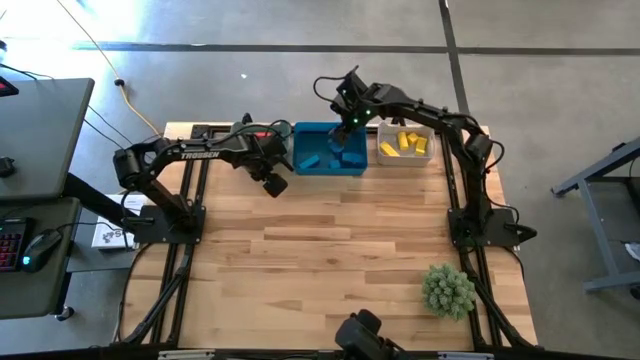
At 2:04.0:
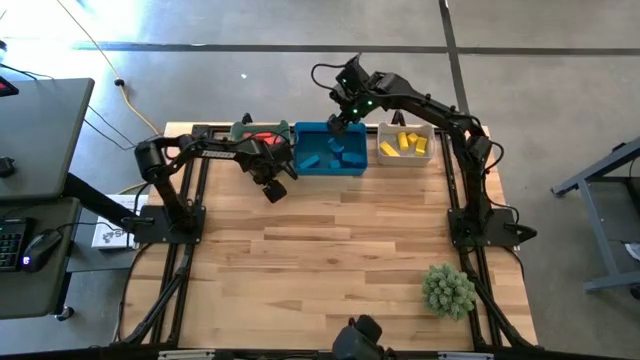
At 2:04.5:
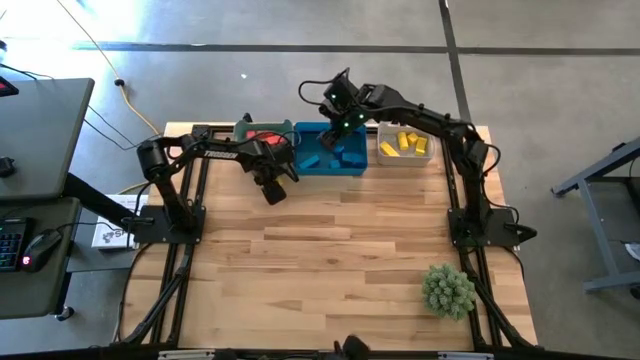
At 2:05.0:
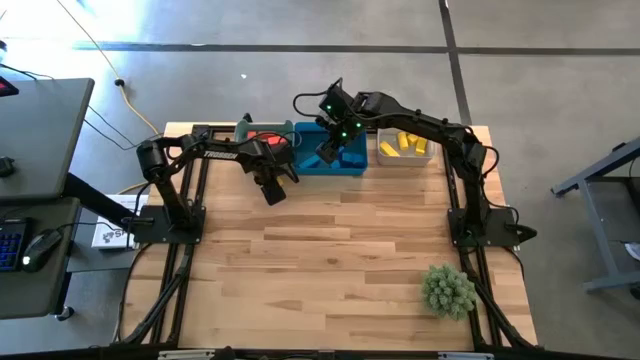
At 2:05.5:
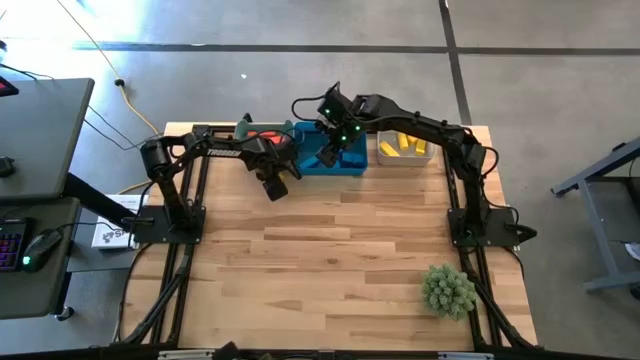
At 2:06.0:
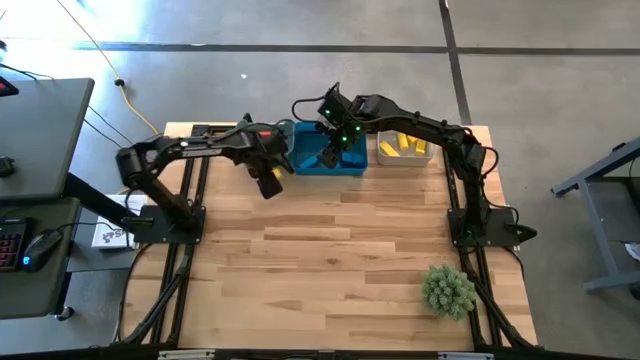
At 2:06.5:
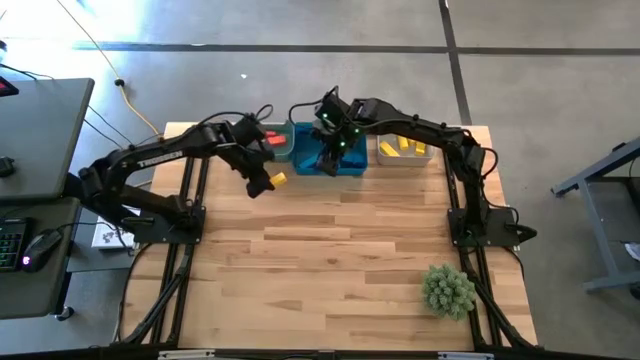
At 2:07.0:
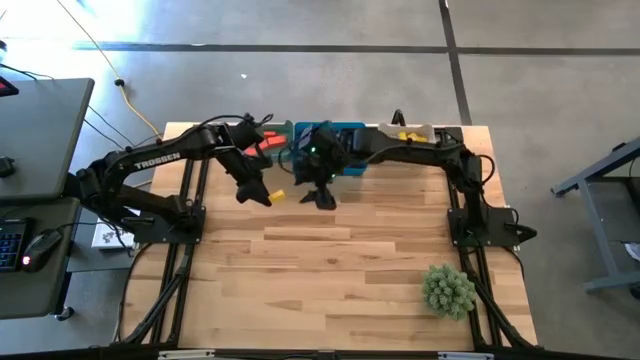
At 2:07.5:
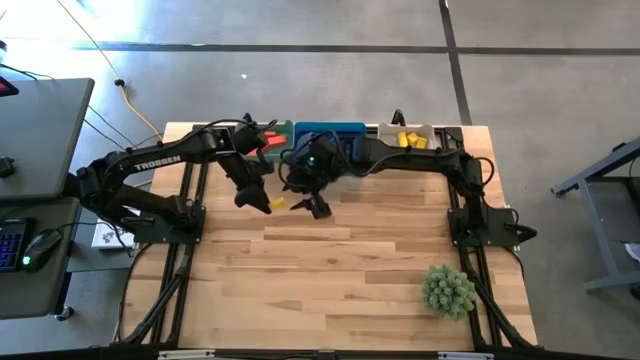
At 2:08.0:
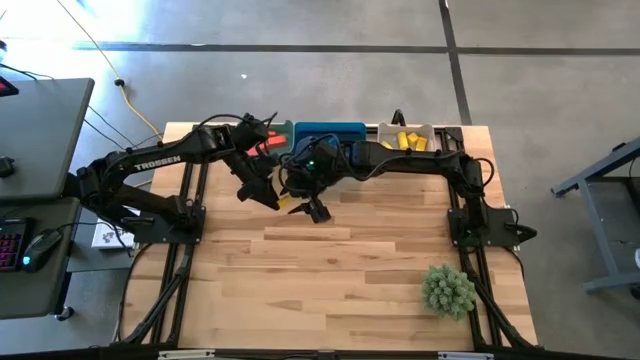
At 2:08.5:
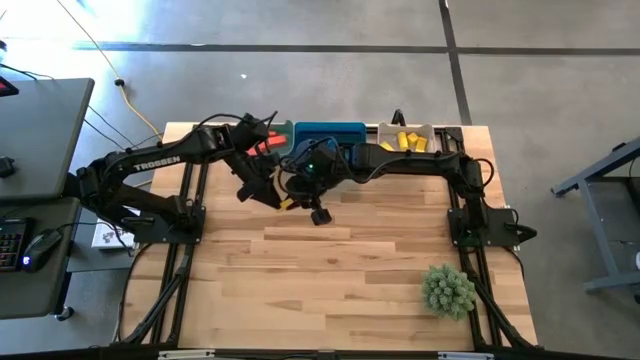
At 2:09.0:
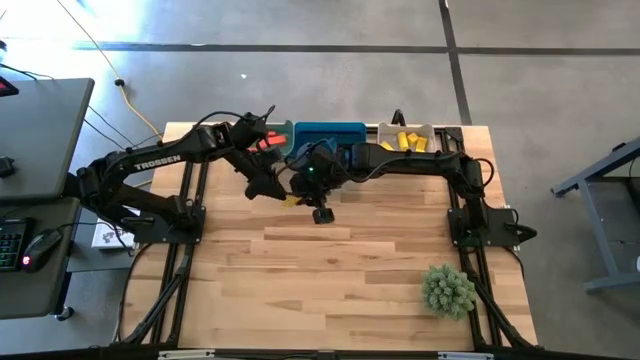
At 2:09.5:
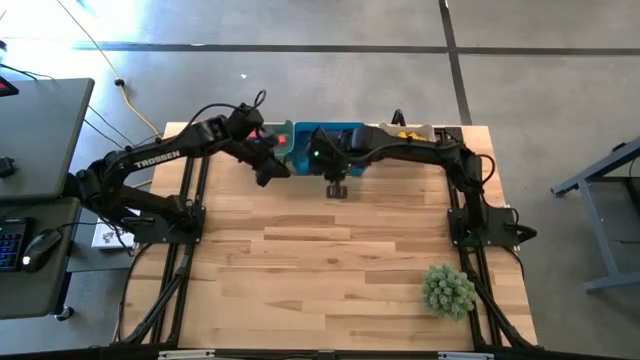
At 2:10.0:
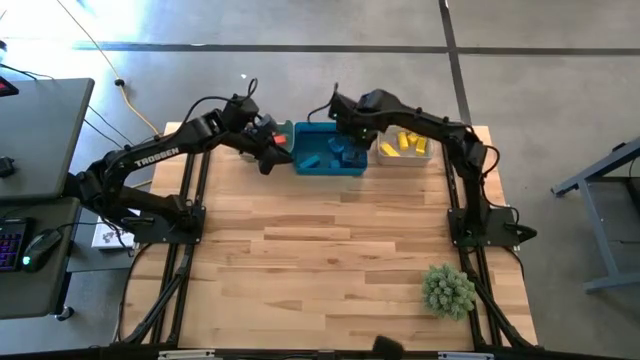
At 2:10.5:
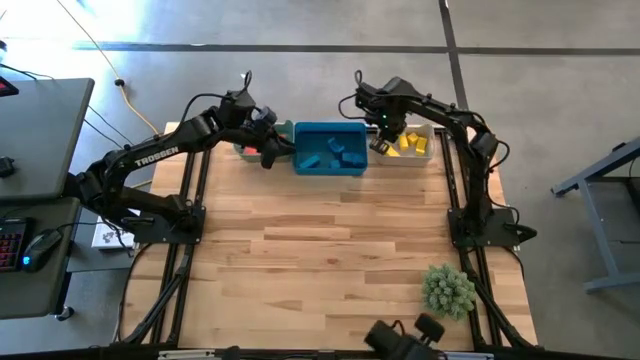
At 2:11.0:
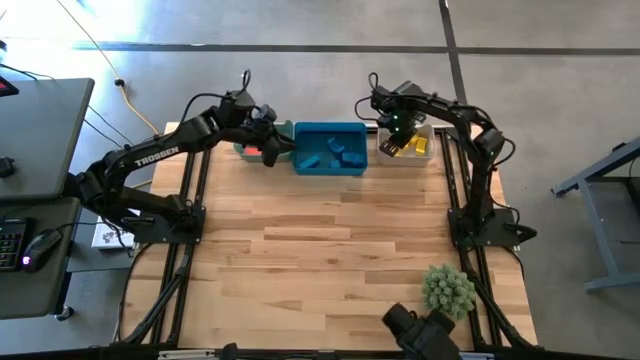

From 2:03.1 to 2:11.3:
Task: Sort & place blocks by color
Put the yellow block into the white bin

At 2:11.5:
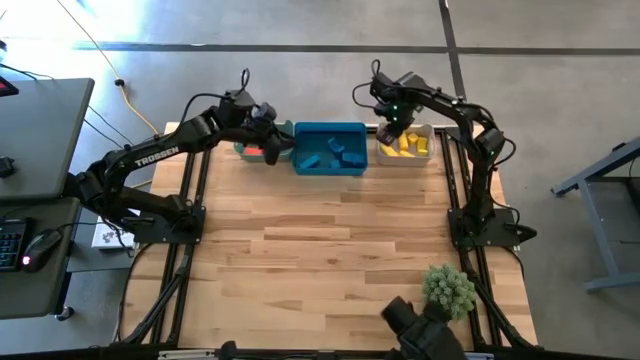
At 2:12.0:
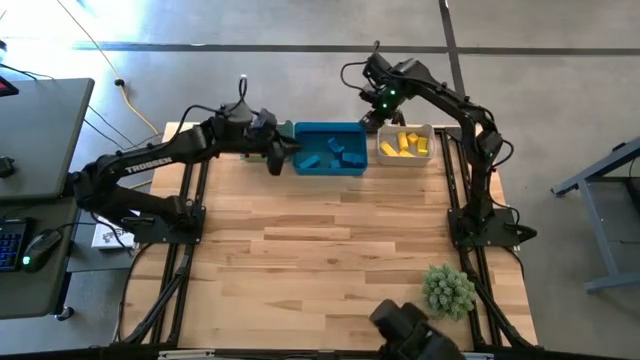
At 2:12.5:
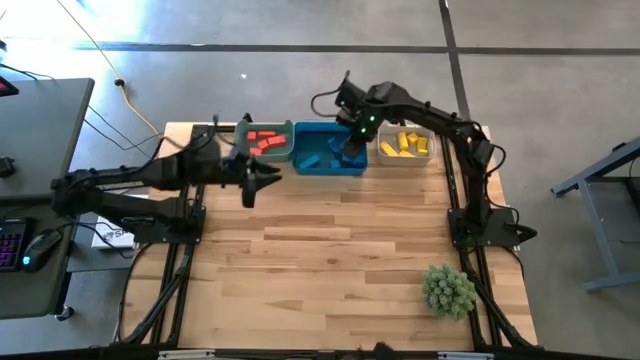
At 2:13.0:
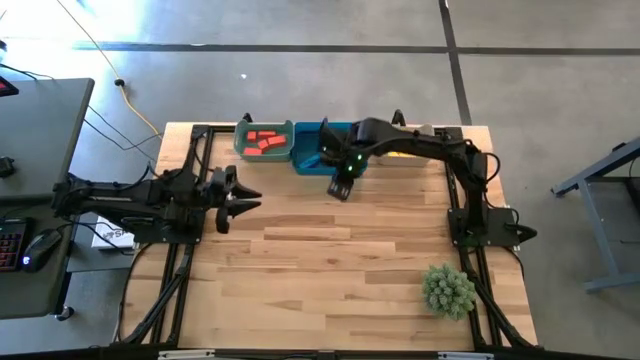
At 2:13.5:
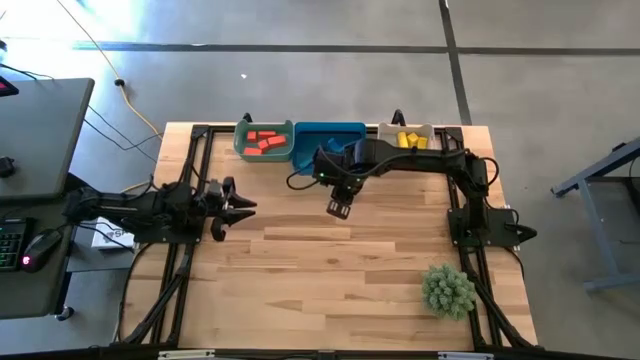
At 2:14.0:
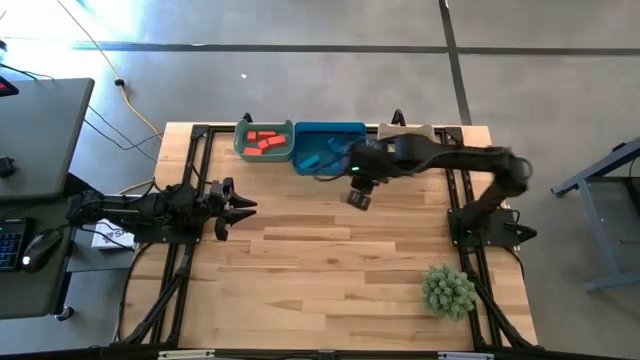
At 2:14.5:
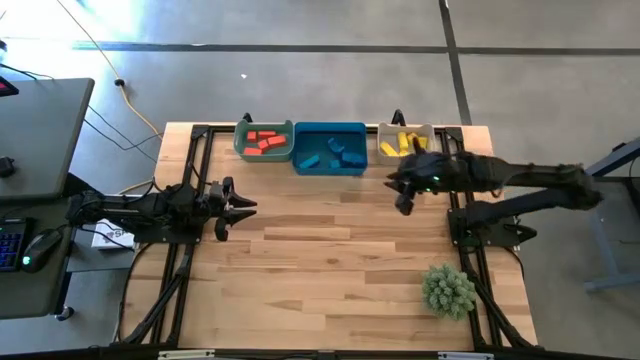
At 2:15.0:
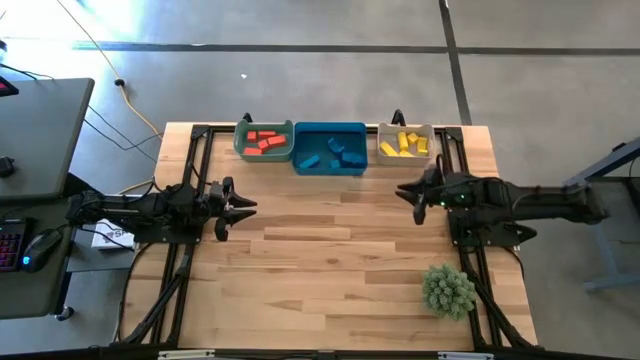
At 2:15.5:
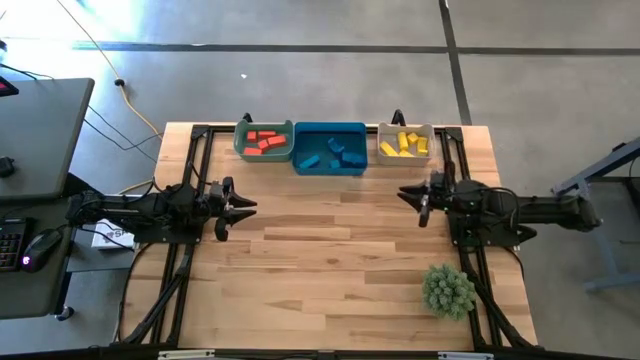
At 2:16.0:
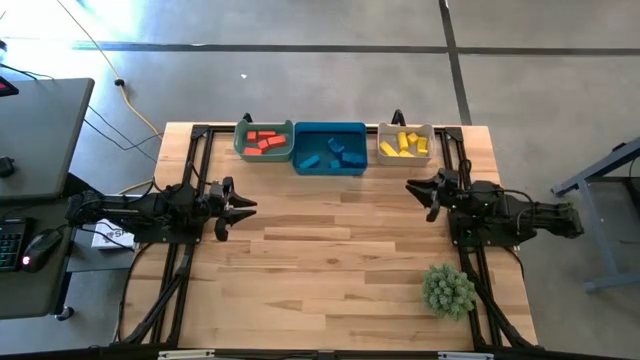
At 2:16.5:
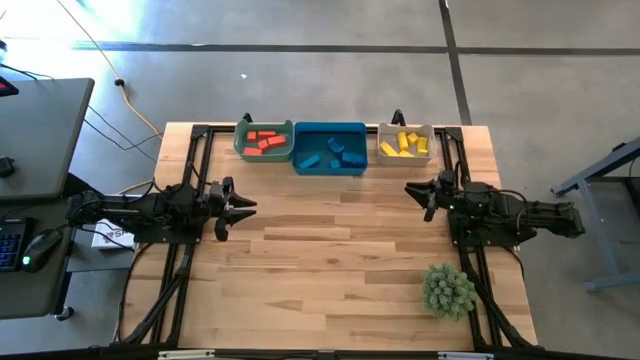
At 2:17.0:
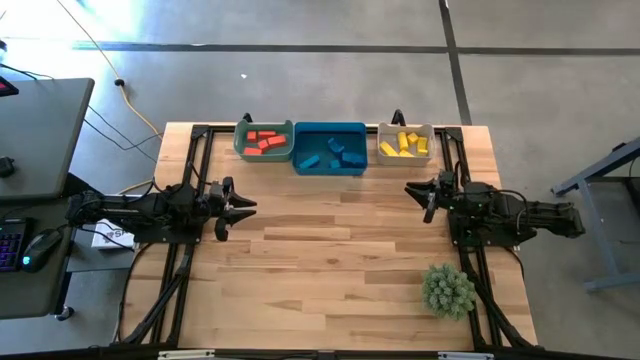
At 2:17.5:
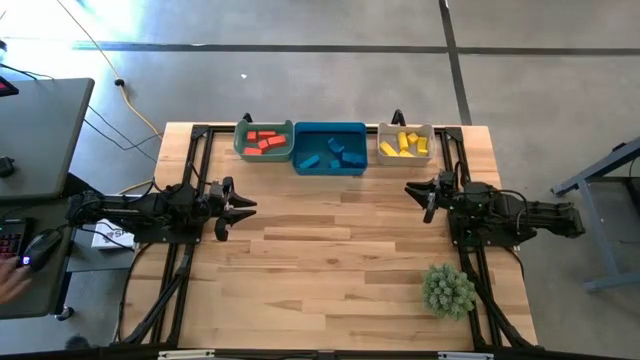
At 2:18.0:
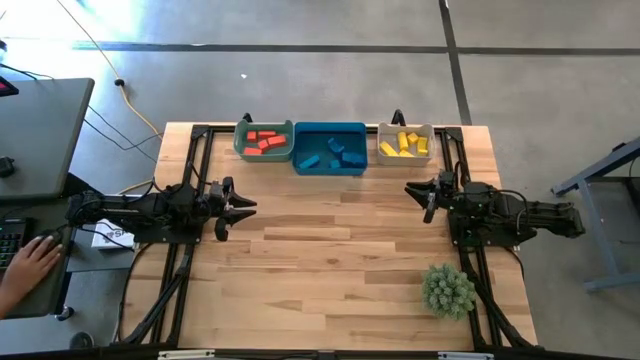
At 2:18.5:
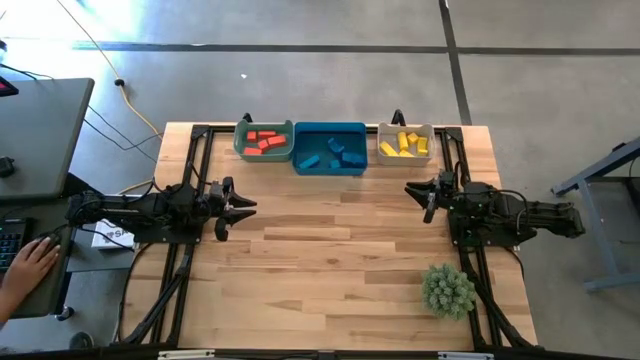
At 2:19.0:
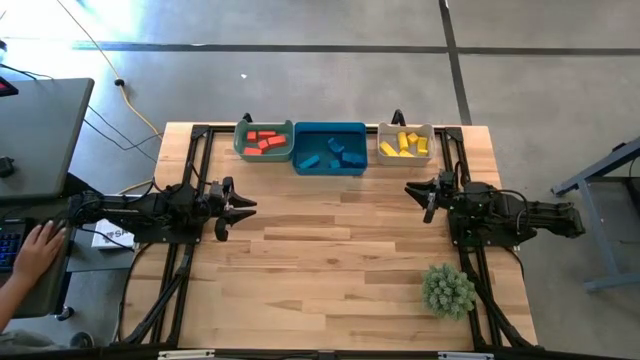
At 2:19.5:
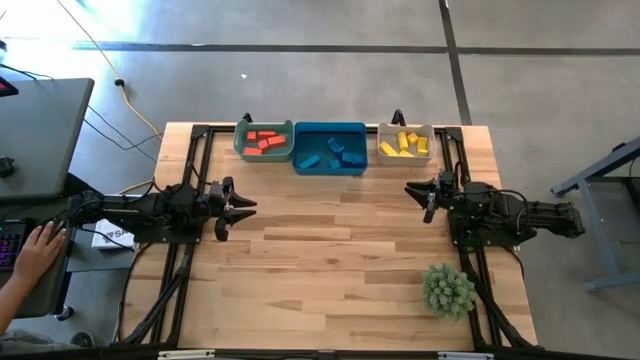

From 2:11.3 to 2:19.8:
Return to Home Position

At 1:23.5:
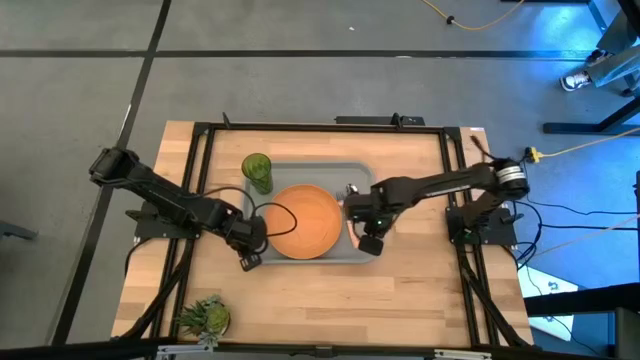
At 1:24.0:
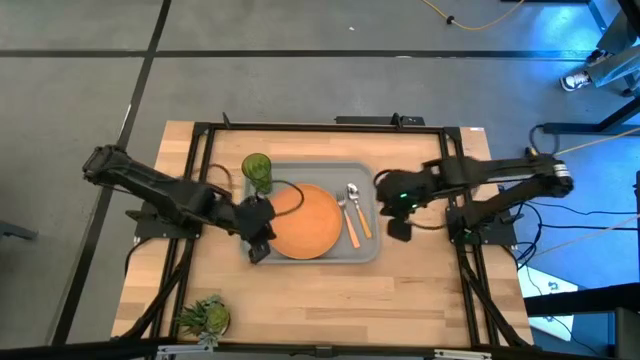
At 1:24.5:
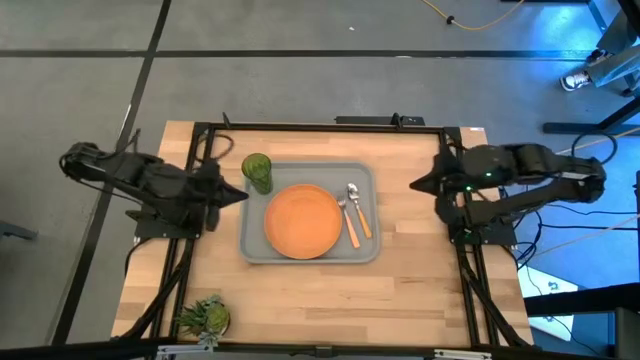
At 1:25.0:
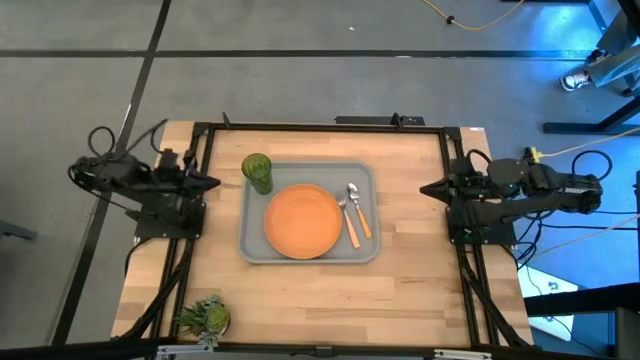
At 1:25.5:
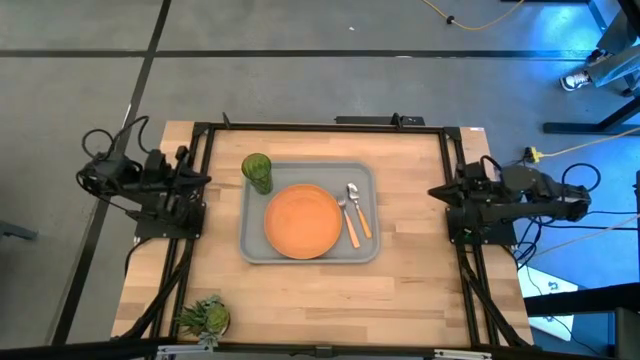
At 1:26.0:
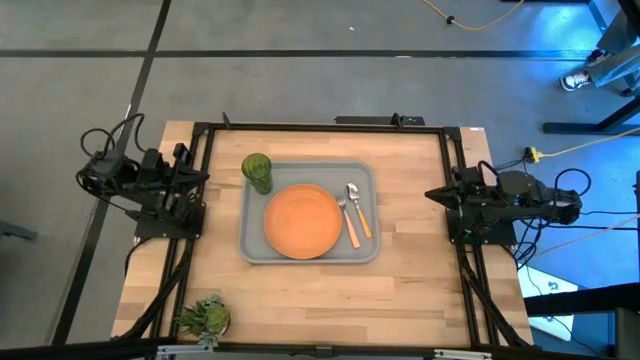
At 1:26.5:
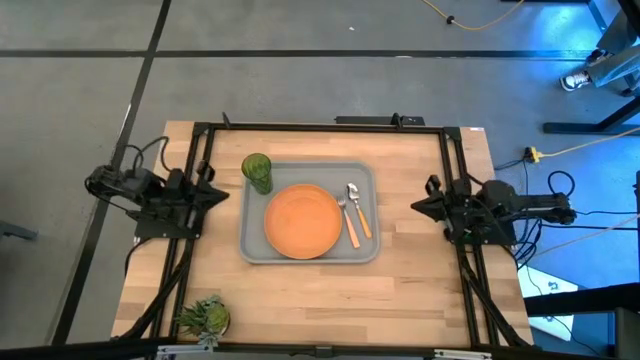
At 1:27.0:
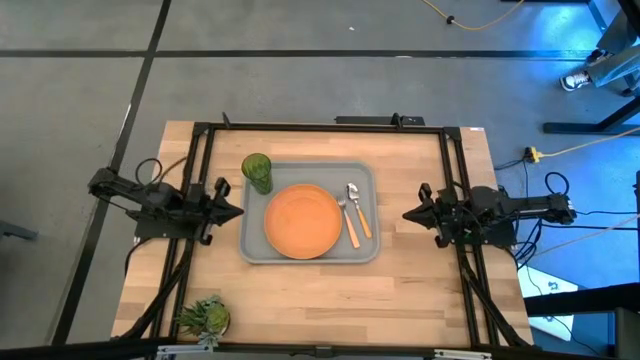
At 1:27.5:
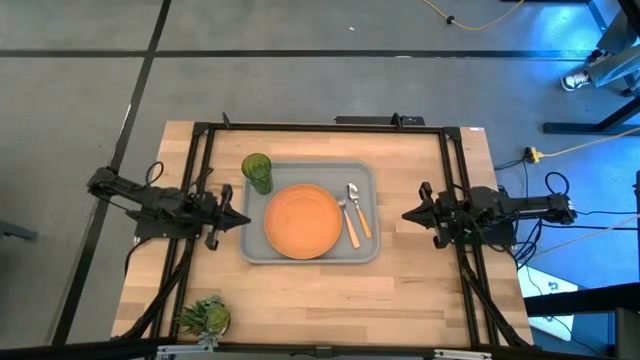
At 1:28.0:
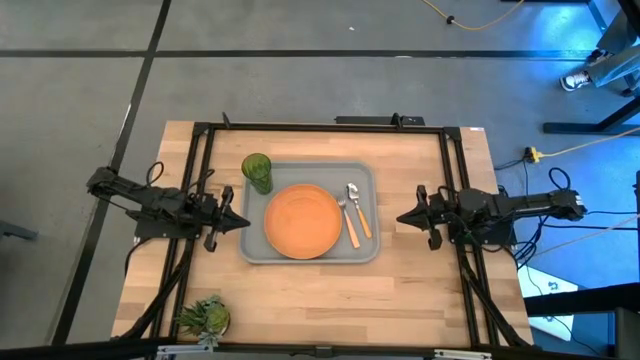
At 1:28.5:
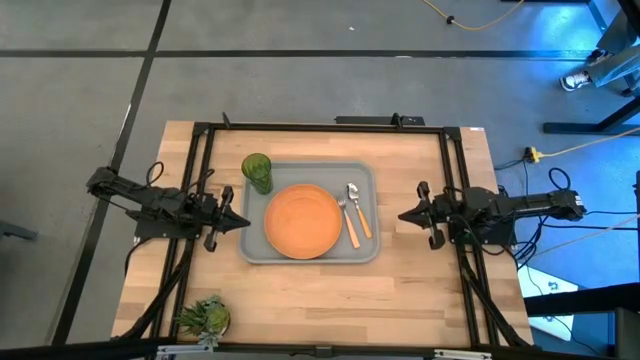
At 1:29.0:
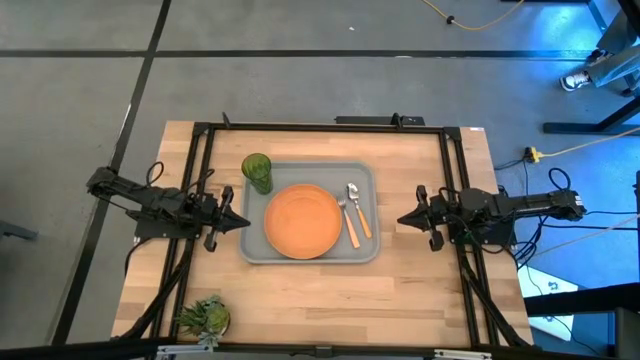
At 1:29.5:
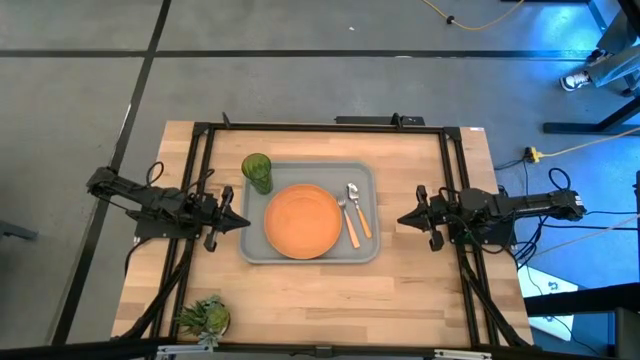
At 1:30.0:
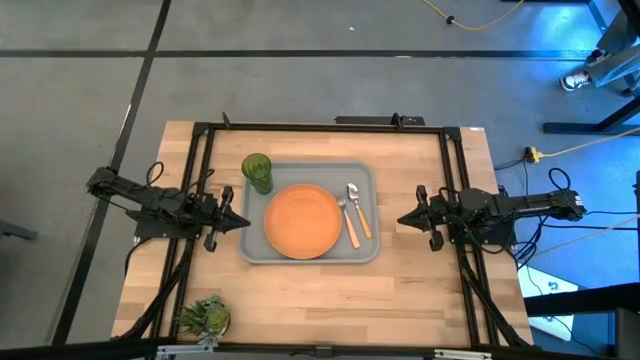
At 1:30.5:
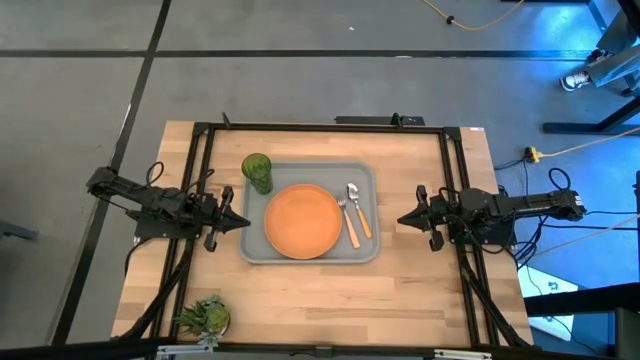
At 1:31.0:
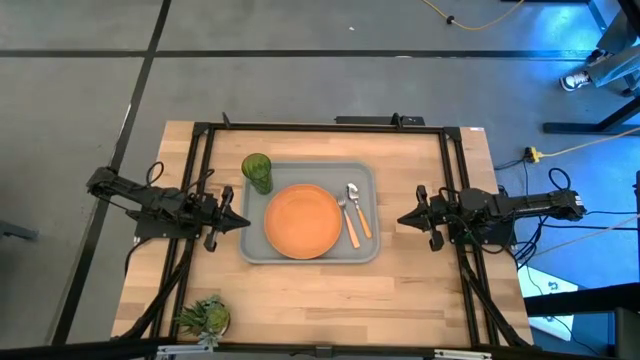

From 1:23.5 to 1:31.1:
Task: Pick and place plate/cup/fork/spoon on tray
Return to Home Position
